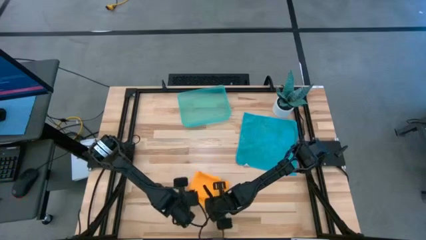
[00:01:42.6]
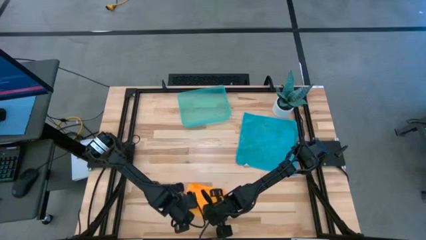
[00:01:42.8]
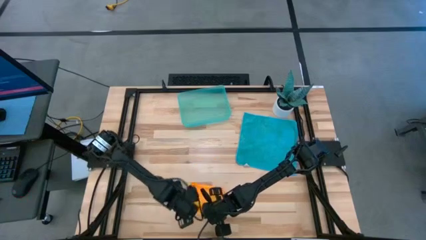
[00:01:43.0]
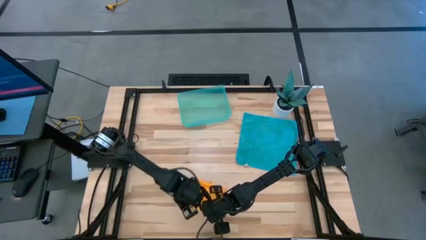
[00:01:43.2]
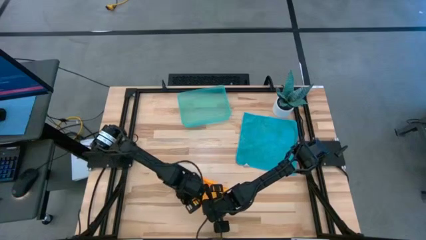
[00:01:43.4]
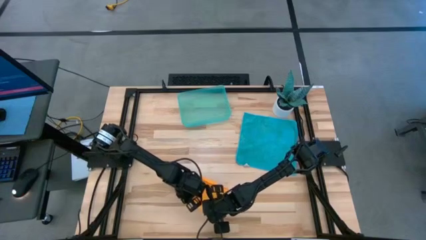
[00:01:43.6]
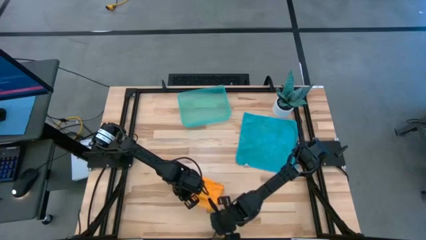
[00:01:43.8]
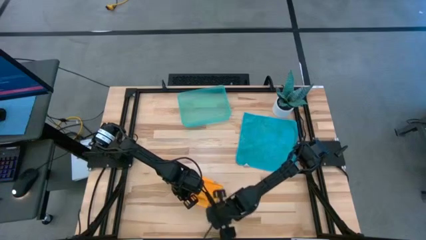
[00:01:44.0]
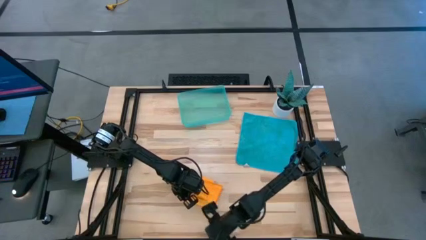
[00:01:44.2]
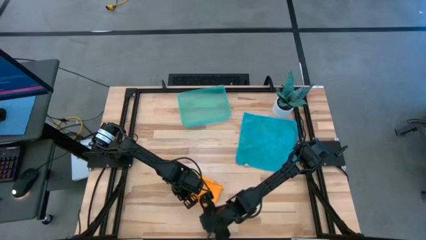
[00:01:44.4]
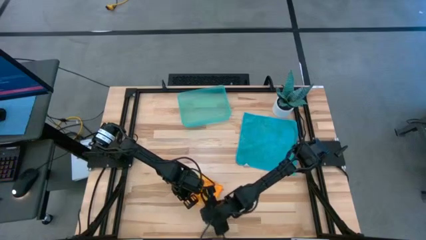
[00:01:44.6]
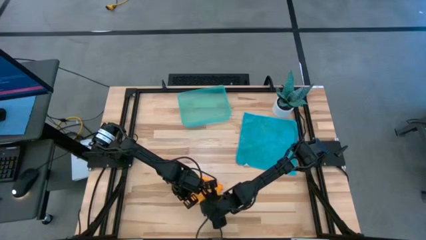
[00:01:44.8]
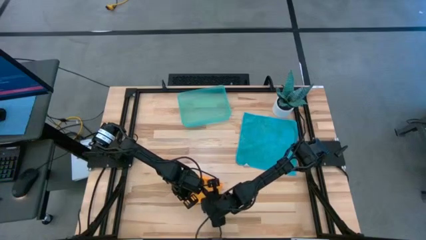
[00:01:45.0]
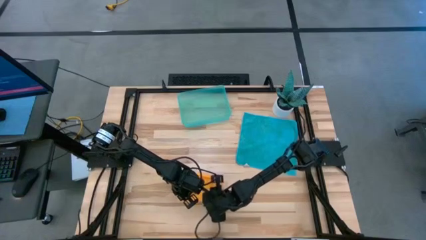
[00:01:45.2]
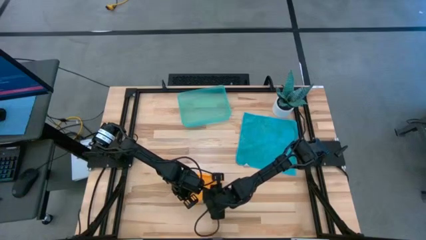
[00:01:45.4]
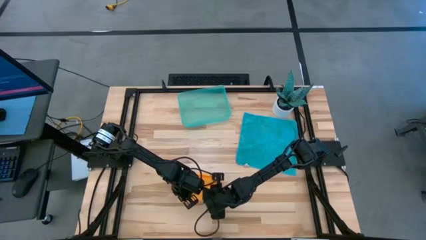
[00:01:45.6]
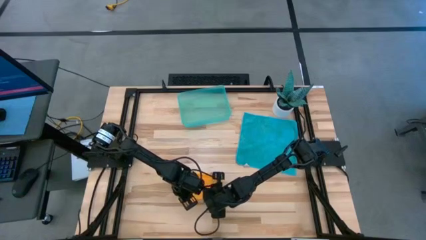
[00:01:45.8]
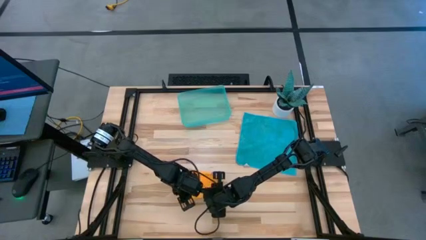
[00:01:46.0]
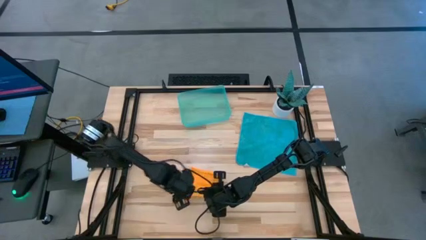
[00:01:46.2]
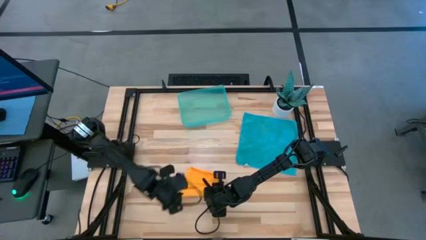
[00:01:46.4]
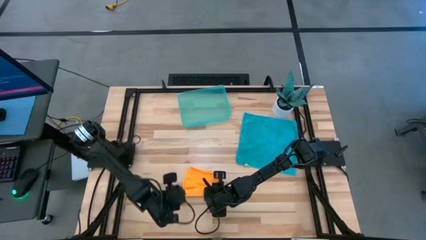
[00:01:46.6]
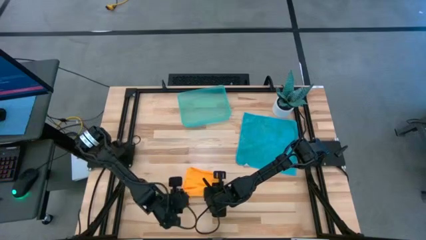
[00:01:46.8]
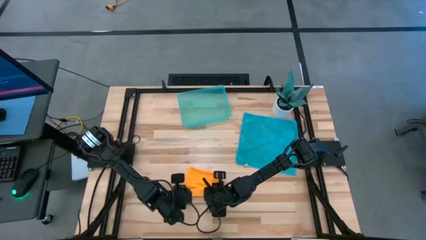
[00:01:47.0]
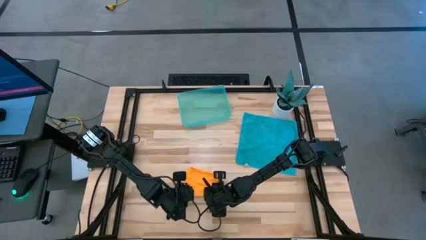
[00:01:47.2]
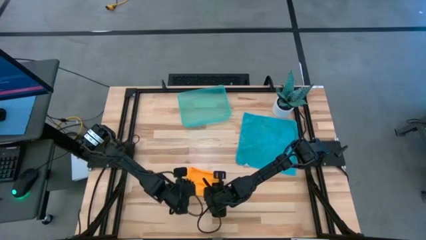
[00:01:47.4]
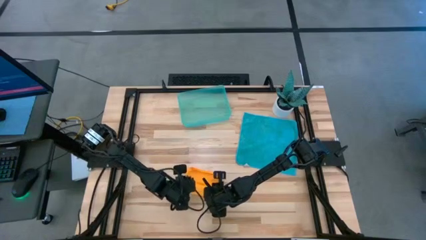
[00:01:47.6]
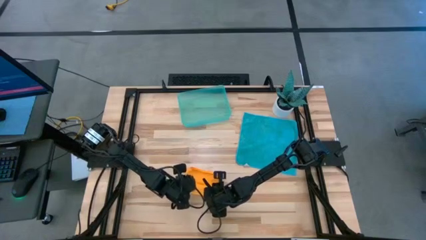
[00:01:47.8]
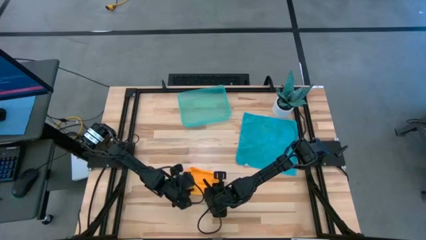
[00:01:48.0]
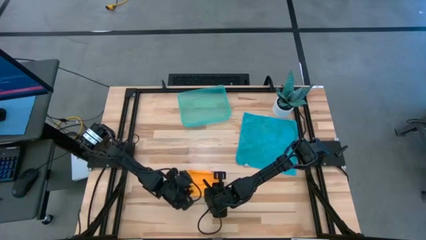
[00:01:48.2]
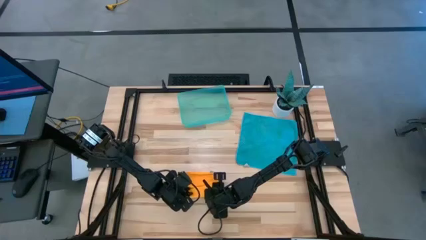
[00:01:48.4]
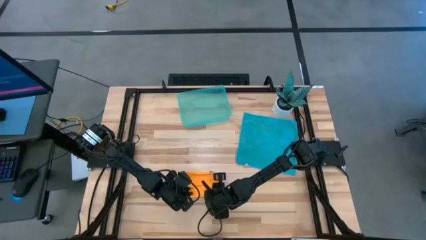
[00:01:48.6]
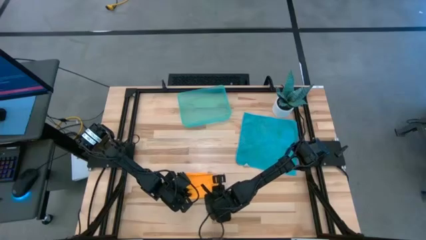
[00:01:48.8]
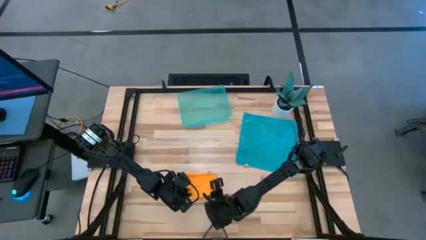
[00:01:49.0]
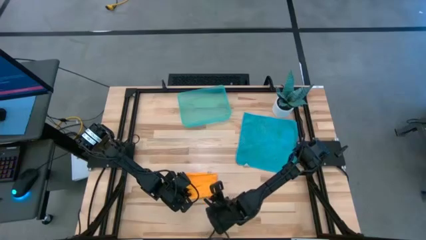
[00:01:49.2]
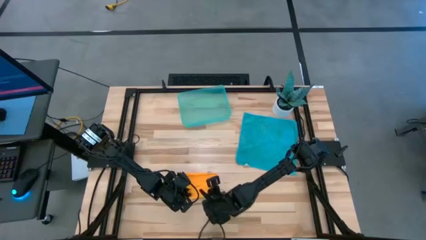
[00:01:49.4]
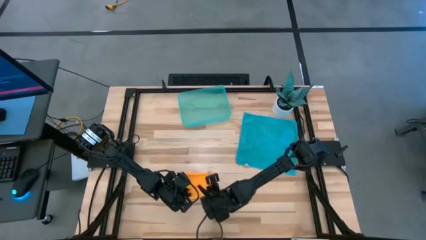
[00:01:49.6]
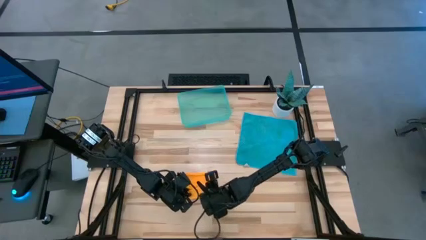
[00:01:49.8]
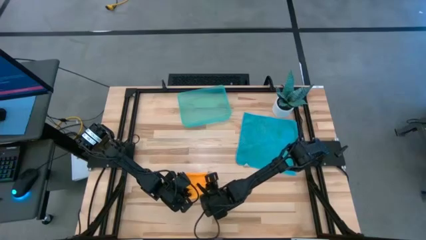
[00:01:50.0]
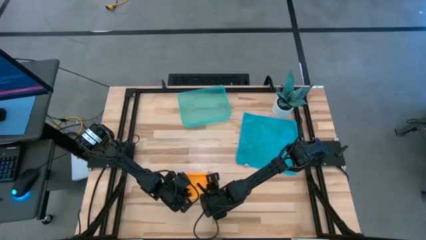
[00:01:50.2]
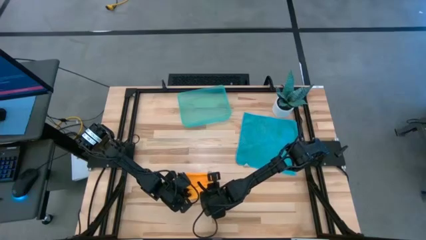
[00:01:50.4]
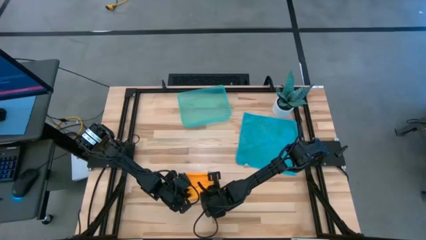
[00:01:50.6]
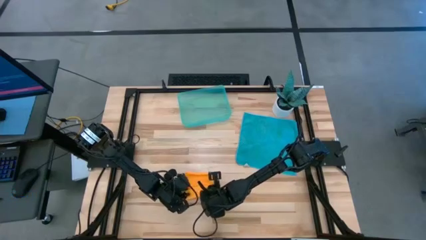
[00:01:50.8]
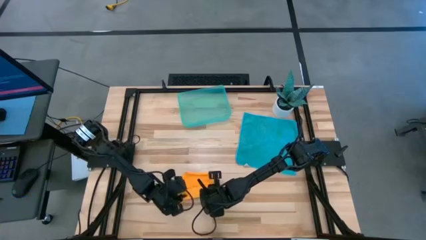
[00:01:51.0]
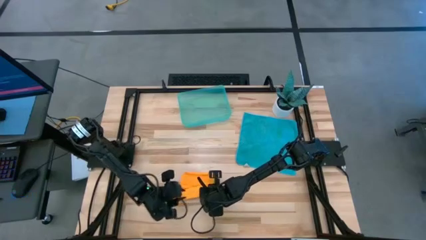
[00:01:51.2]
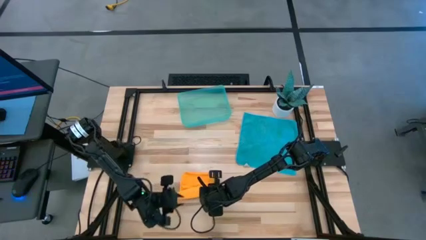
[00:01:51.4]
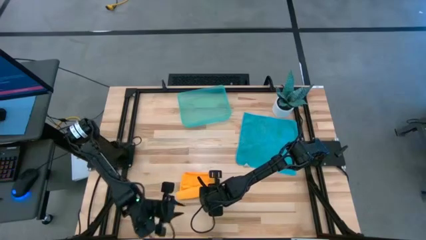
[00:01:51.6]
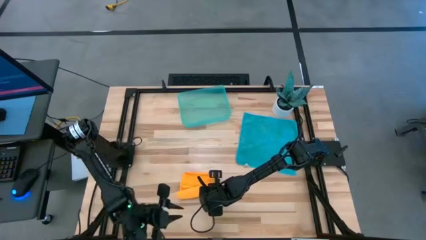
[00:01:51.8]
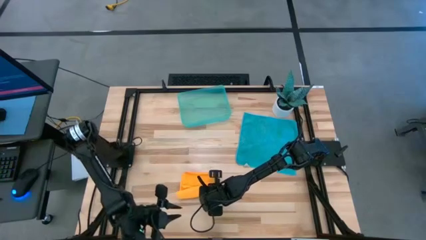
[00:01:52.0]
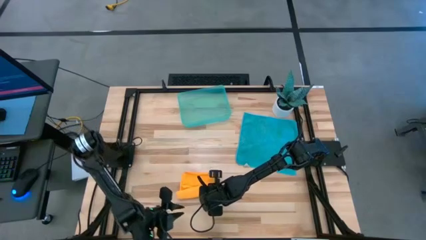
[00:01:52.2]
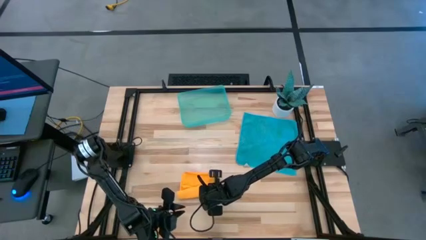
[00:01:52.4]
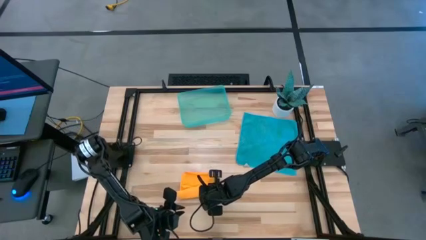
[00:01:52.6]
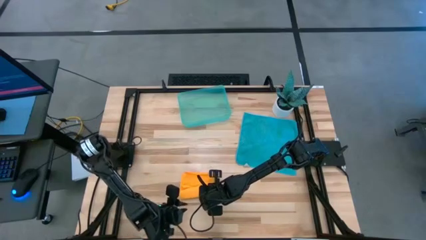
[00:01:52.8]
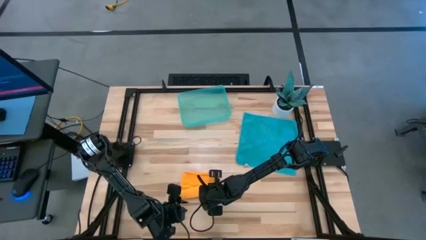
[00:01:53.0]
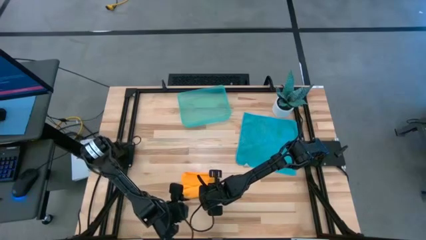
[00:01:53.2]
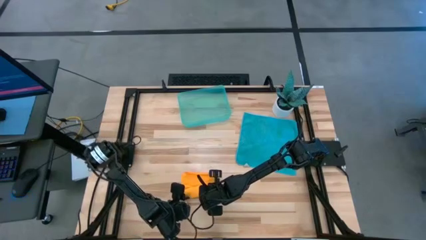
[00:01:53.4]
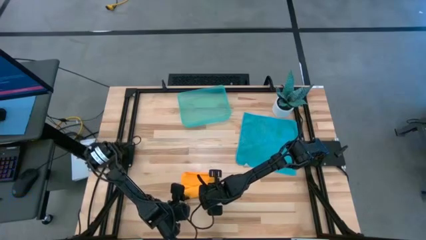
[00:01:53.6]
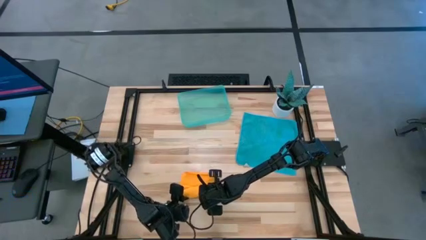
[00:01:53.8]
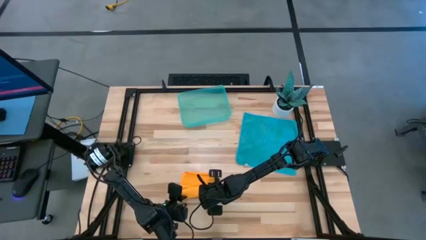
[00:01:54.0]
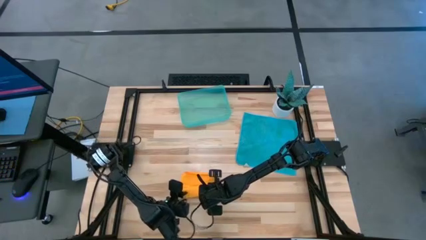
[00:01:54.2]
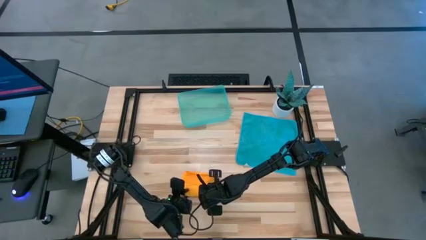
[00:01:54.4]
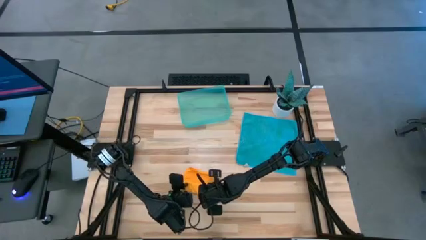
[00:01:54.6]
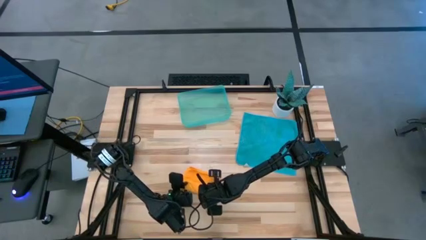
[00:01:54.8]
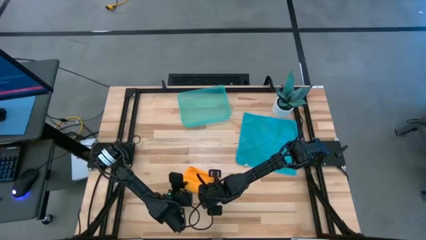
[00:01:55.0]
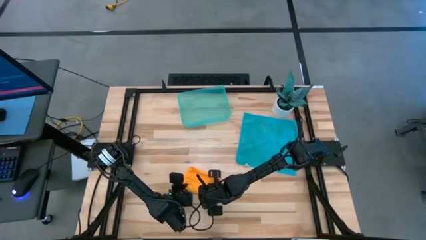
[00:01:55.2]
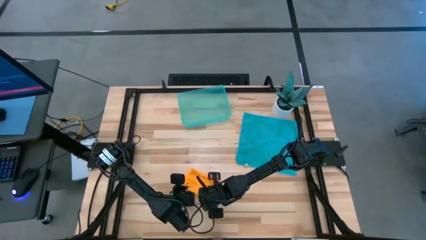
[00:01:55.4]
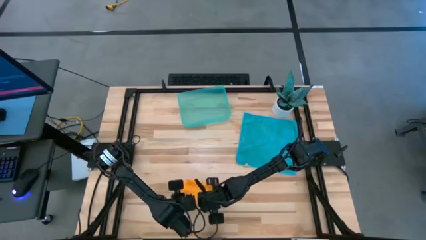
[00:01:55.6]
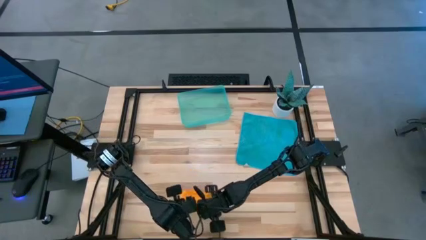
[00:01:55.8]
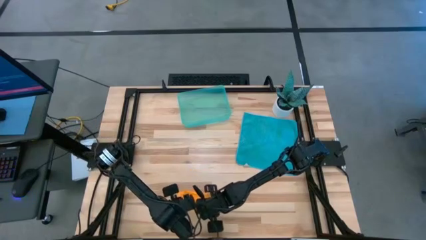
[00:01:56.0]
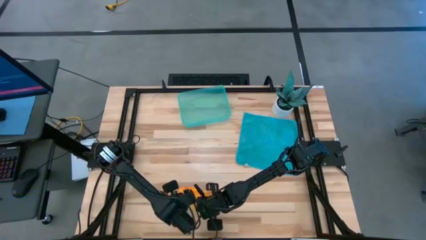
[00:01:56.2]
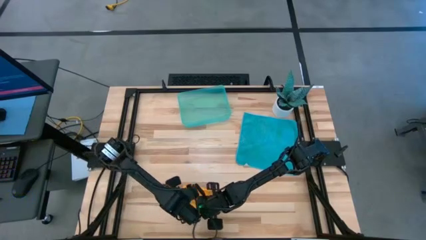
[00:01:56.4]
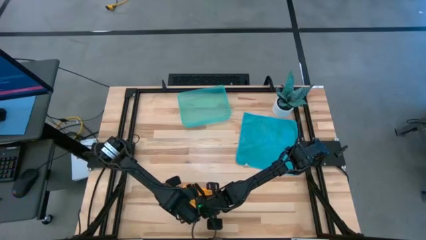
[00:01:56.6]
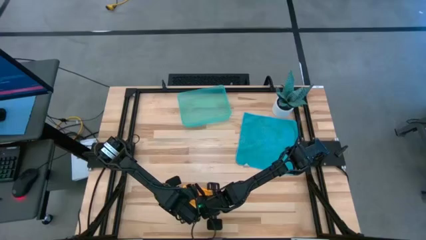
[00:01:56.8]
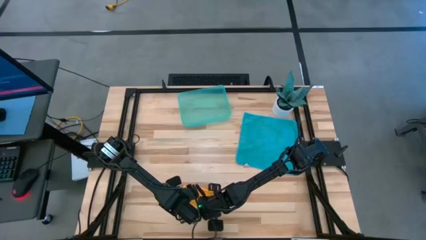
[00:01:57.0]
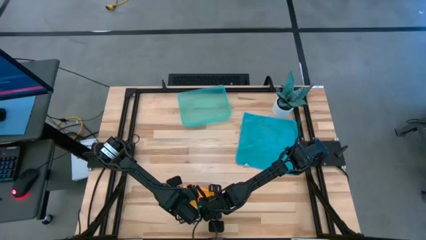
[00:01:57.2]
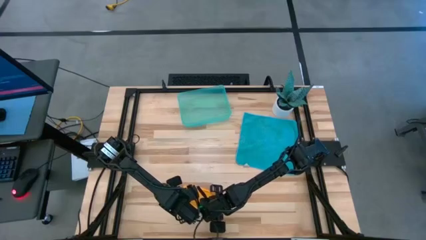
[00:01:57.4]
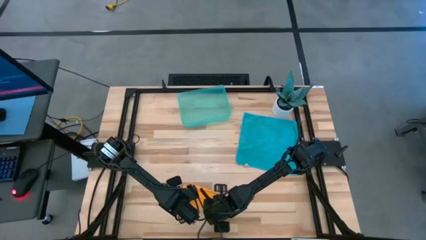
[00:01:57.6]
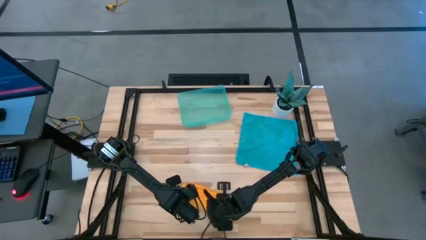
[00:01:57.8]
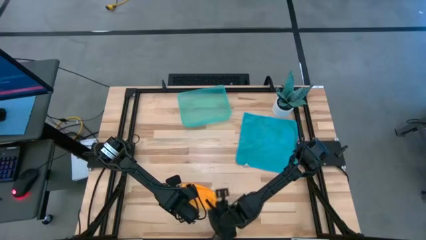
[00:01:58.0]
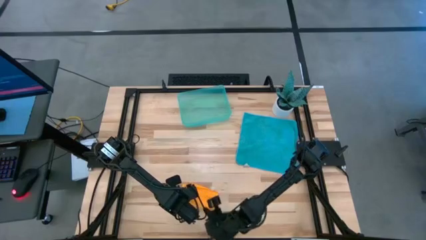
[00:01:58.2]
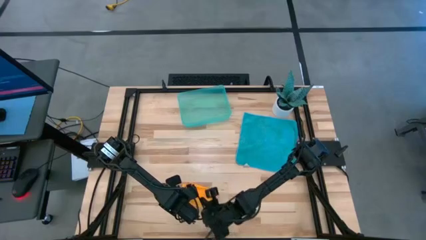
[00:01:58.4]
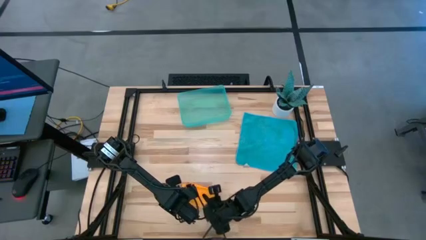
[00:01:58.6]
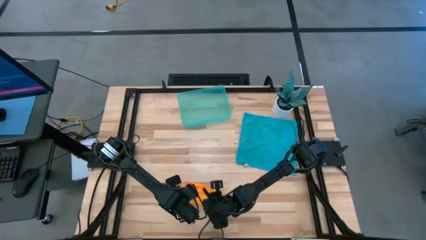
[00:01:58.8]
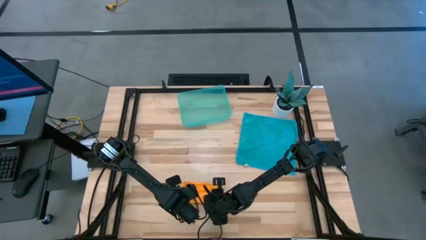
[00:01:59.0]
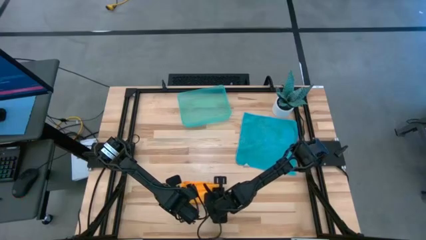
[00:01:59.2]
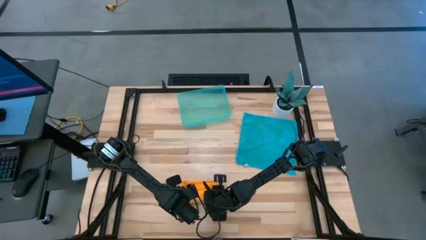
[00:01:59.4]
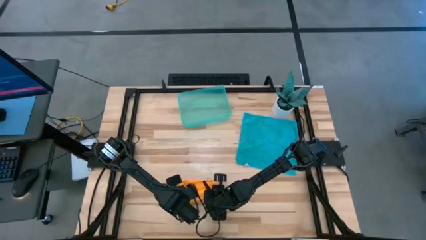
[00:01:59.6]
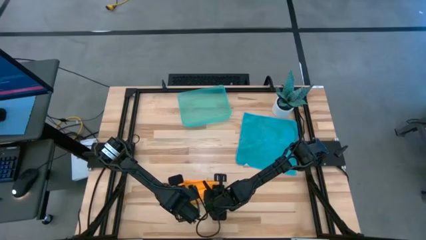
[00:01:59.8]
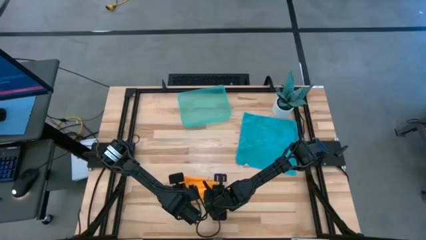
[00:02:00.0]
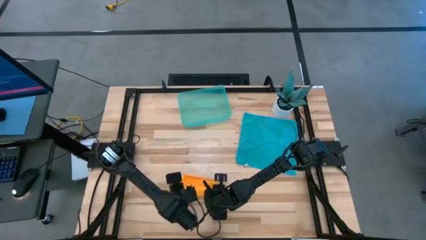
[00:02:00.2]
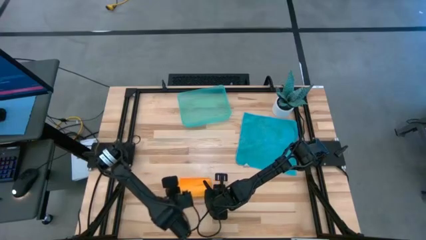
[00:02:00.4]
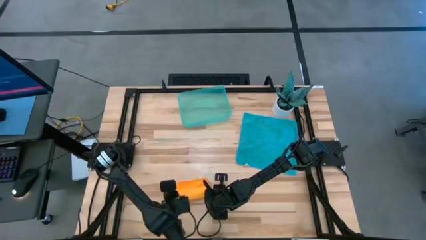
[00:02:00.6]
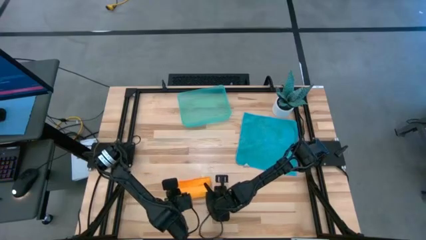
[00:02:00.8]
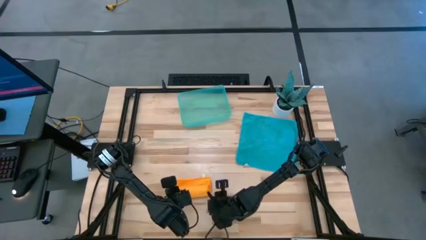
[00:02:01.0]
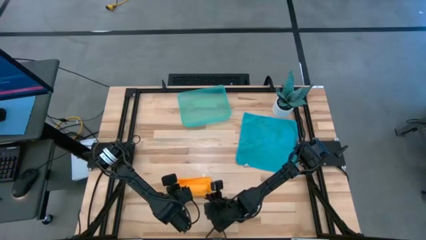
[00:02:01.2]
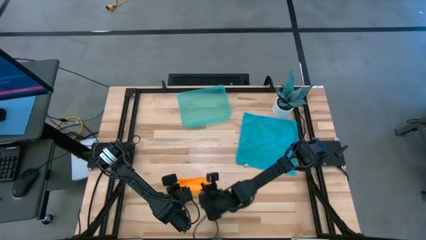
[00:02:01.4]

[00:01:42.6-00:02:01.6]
Task: Roll microfiber towels into tight, uniform cylinder then place into a basket
Roll the yellow microfiber towel
